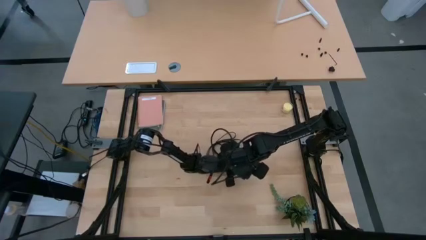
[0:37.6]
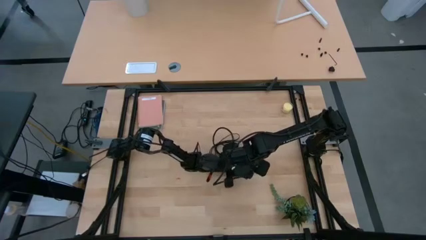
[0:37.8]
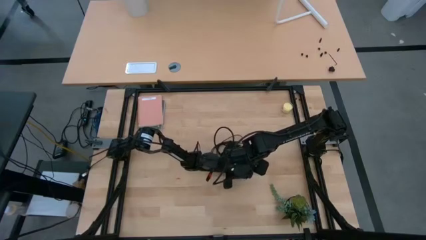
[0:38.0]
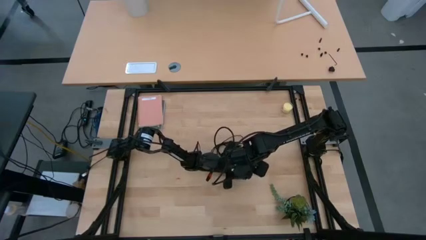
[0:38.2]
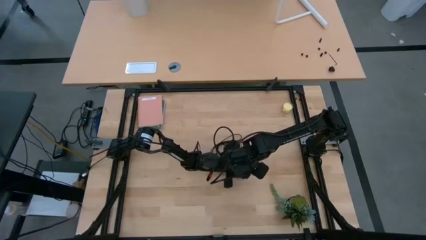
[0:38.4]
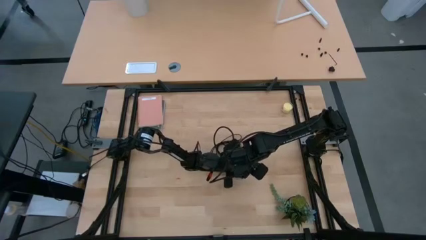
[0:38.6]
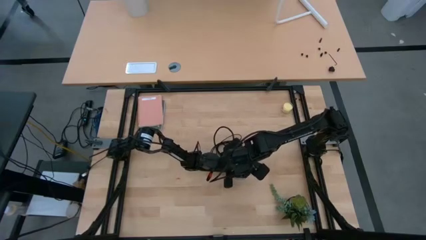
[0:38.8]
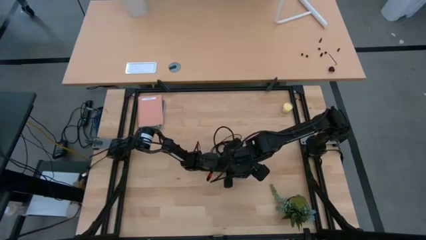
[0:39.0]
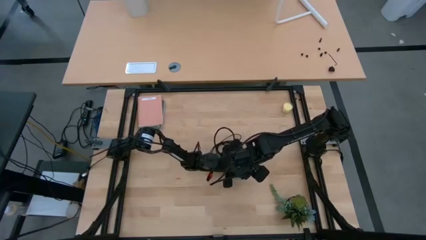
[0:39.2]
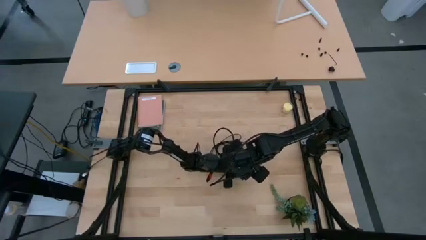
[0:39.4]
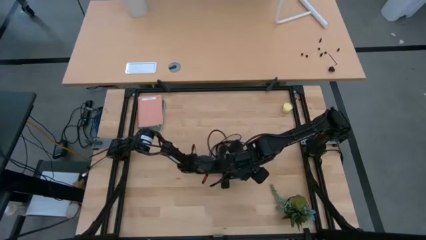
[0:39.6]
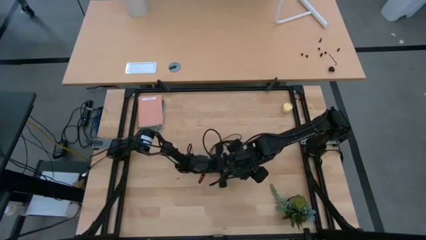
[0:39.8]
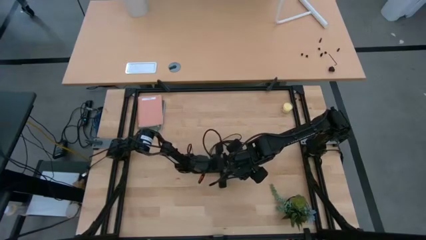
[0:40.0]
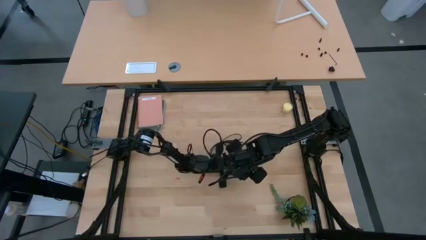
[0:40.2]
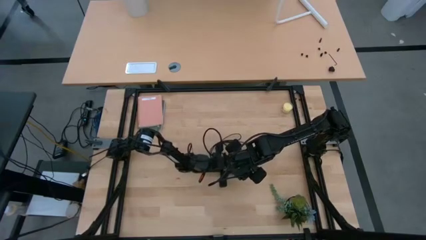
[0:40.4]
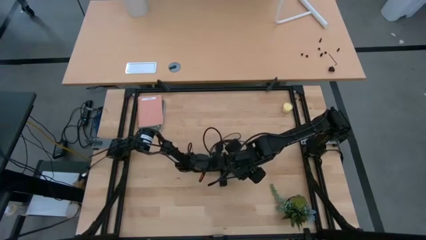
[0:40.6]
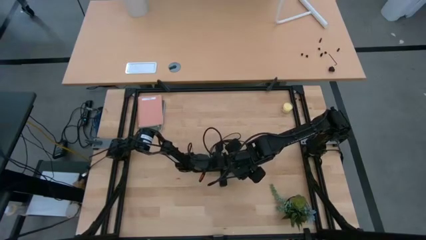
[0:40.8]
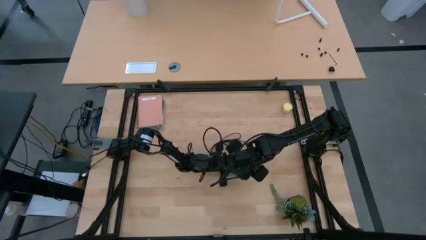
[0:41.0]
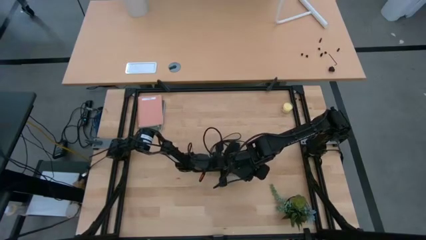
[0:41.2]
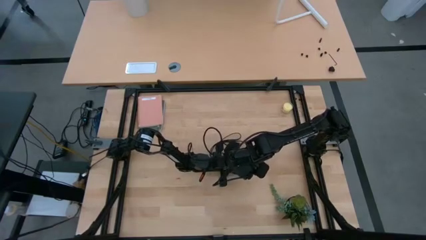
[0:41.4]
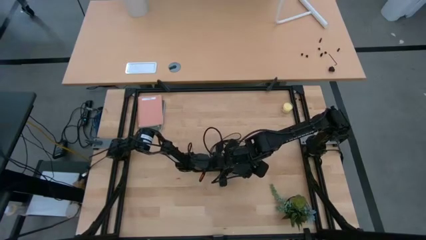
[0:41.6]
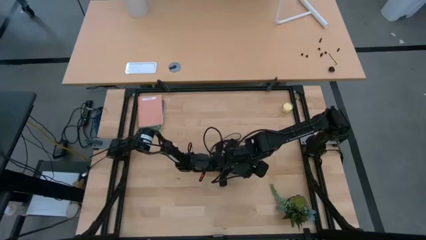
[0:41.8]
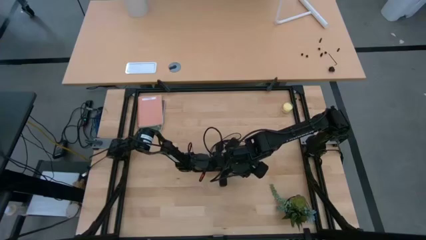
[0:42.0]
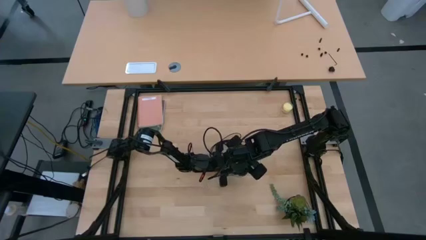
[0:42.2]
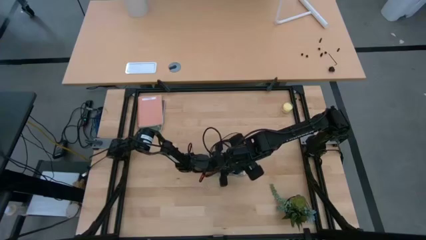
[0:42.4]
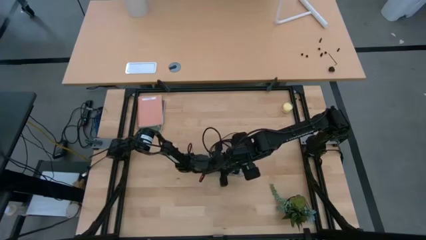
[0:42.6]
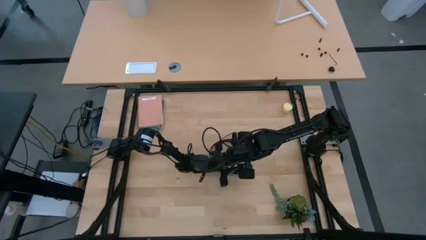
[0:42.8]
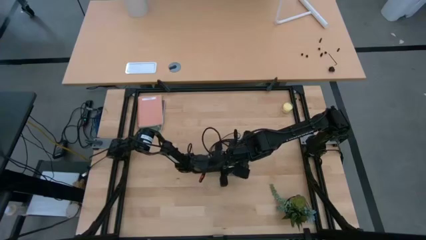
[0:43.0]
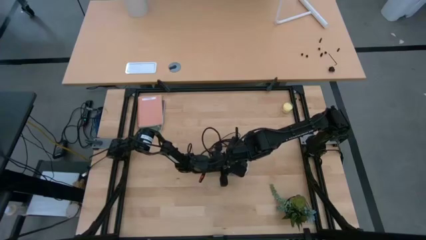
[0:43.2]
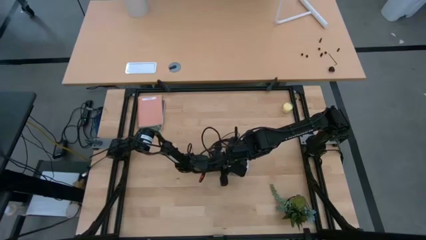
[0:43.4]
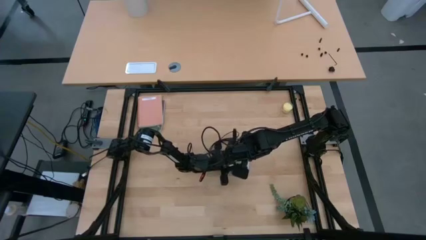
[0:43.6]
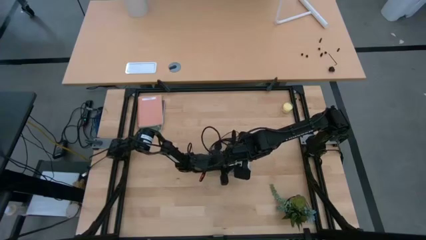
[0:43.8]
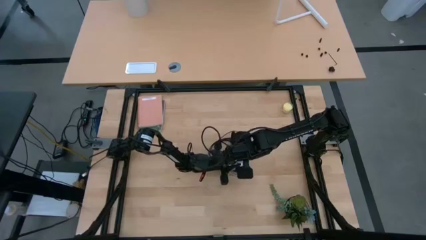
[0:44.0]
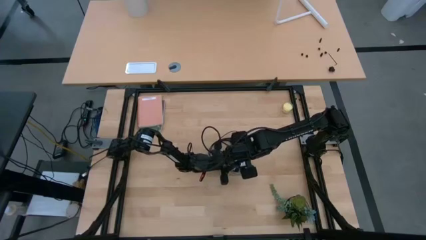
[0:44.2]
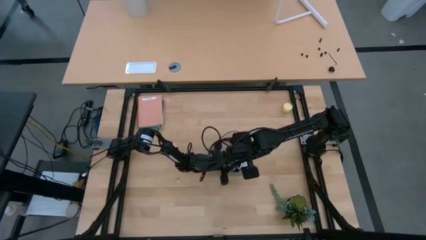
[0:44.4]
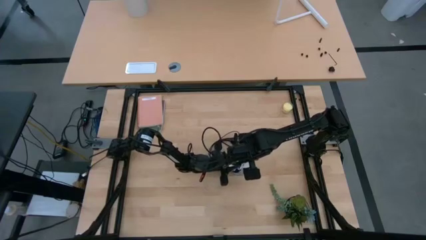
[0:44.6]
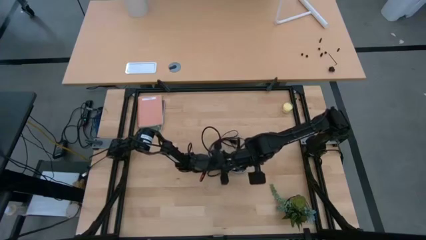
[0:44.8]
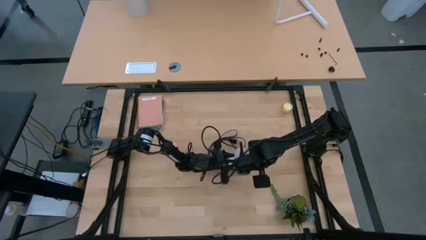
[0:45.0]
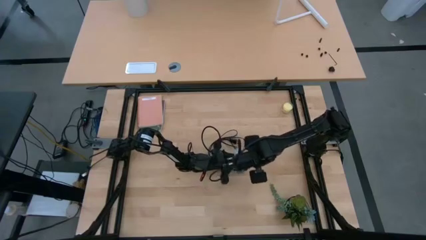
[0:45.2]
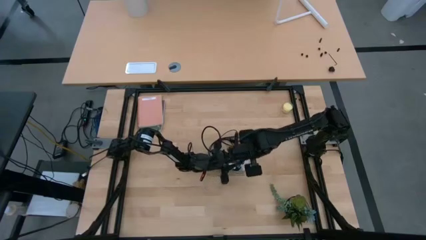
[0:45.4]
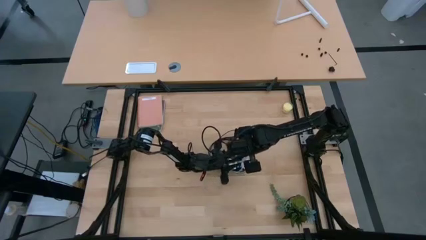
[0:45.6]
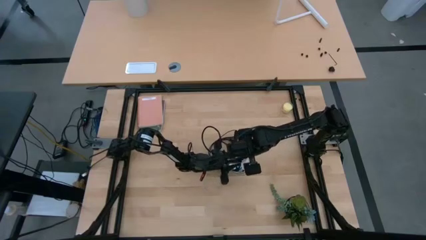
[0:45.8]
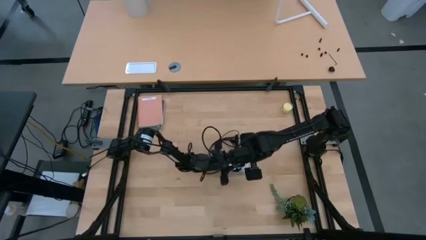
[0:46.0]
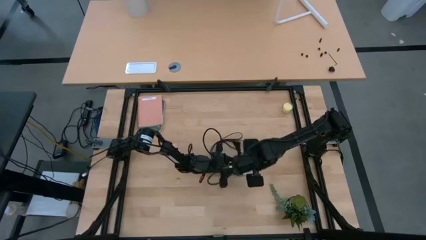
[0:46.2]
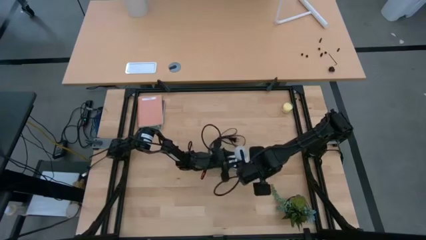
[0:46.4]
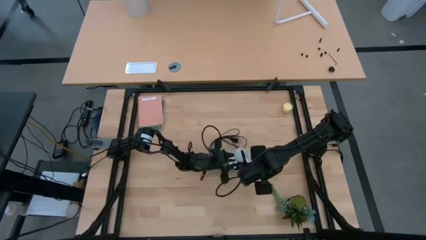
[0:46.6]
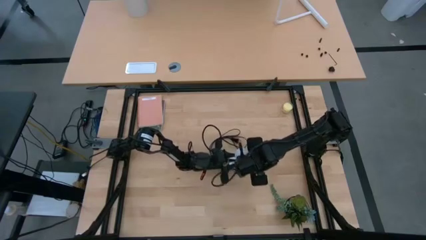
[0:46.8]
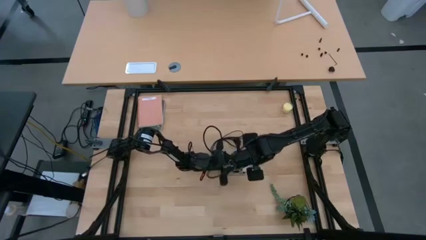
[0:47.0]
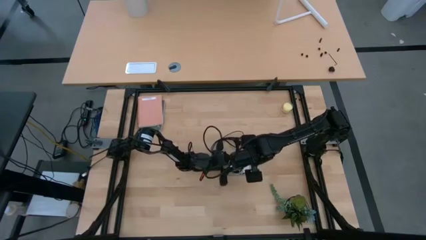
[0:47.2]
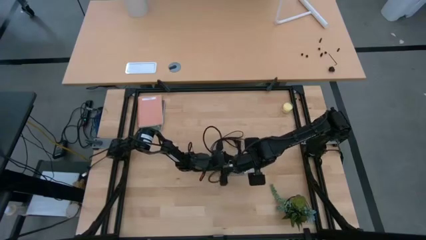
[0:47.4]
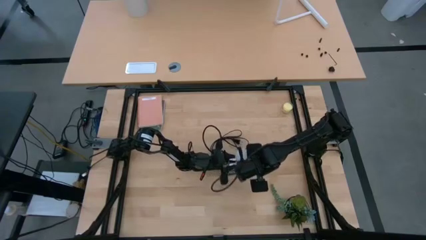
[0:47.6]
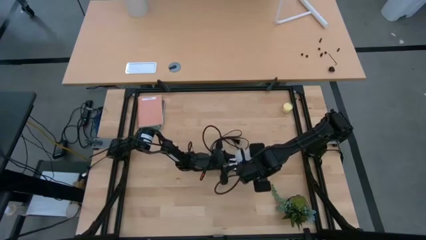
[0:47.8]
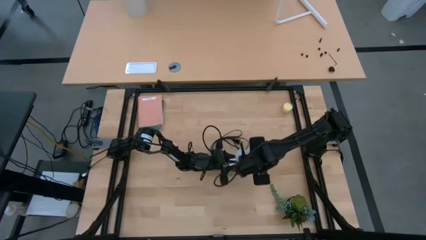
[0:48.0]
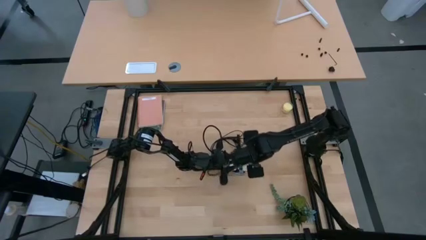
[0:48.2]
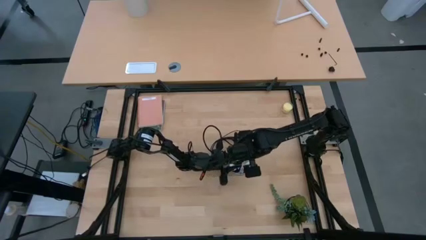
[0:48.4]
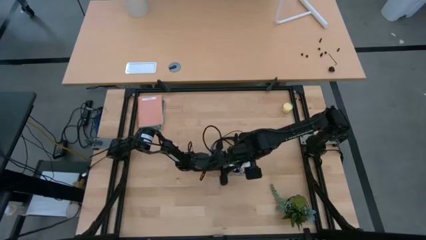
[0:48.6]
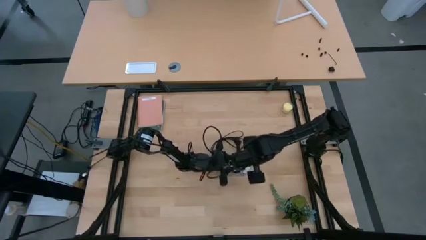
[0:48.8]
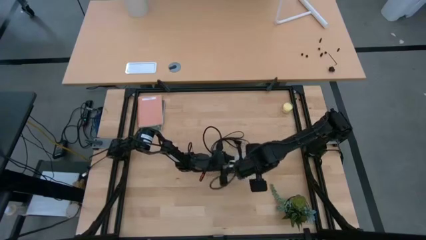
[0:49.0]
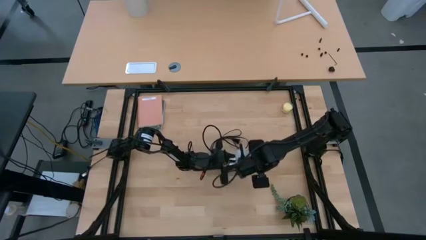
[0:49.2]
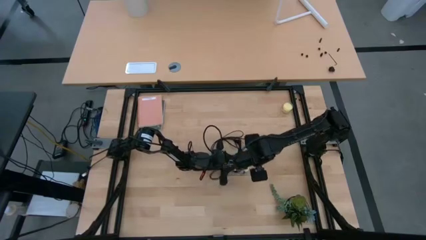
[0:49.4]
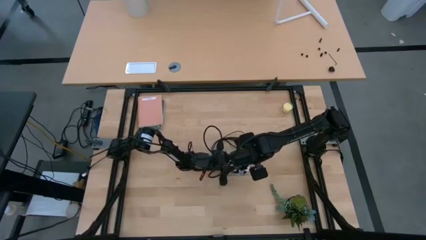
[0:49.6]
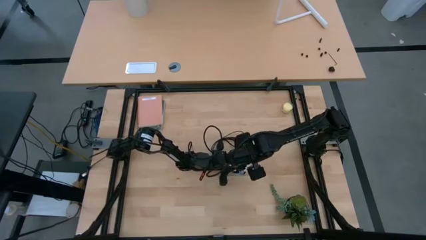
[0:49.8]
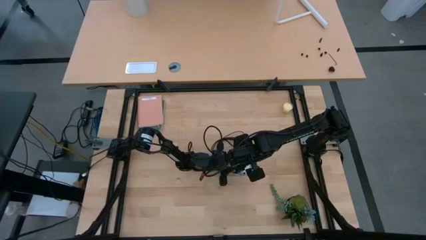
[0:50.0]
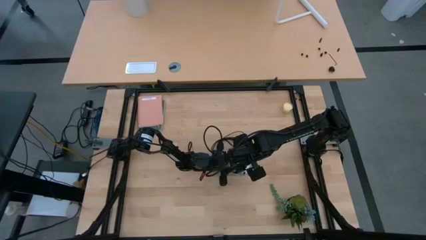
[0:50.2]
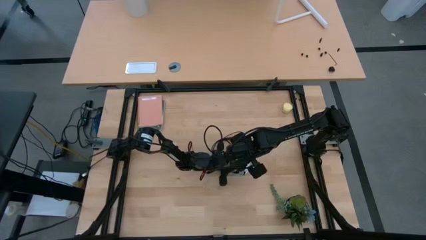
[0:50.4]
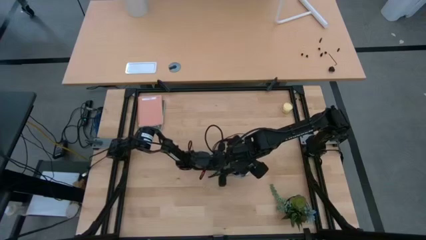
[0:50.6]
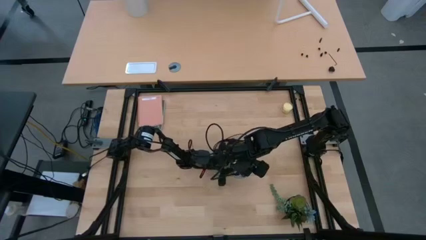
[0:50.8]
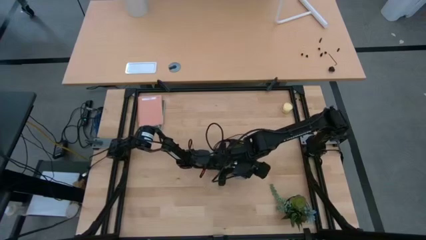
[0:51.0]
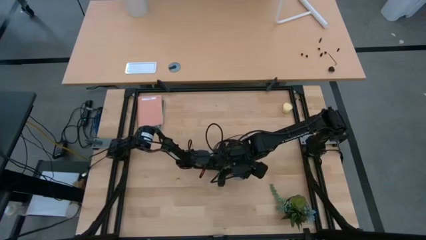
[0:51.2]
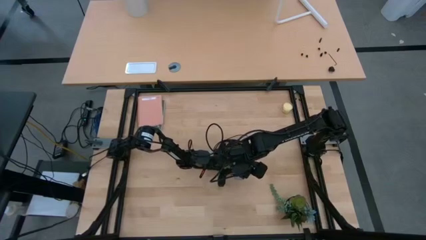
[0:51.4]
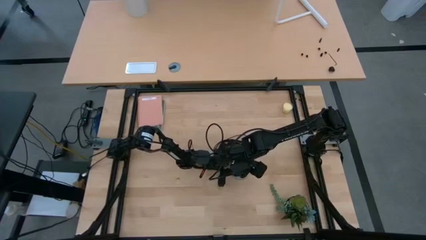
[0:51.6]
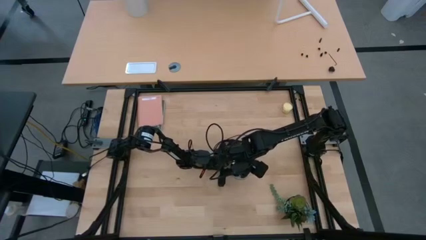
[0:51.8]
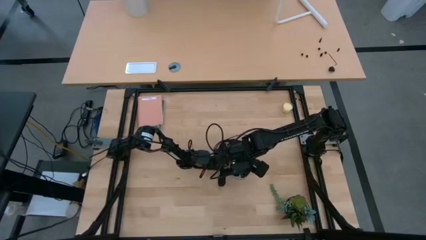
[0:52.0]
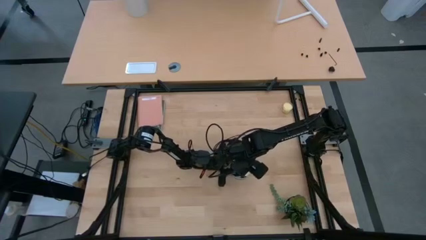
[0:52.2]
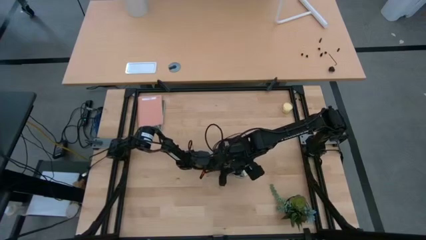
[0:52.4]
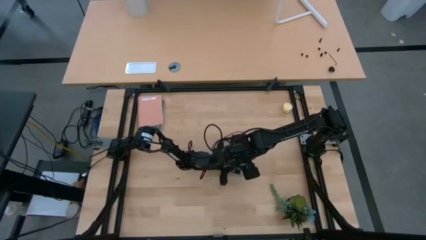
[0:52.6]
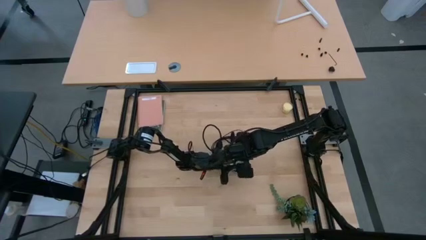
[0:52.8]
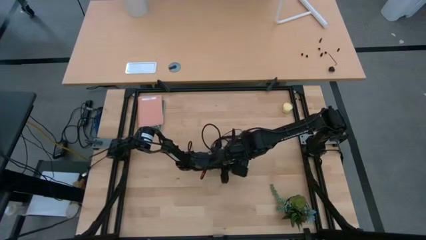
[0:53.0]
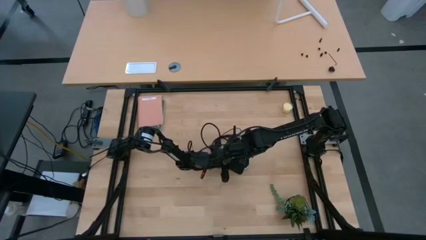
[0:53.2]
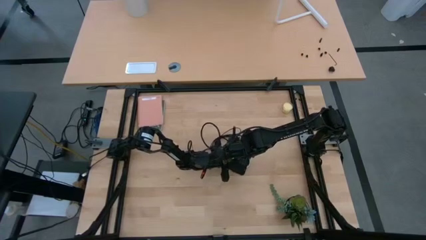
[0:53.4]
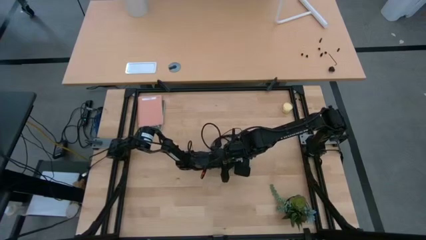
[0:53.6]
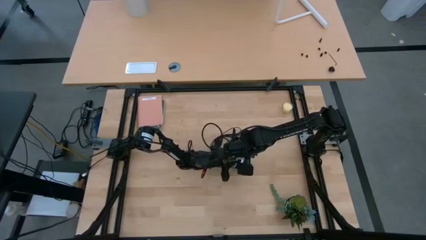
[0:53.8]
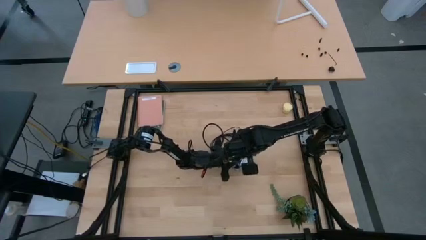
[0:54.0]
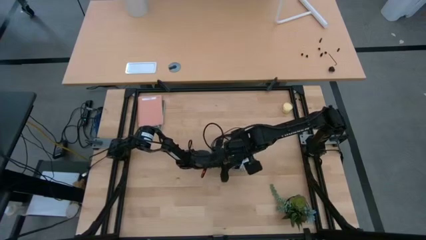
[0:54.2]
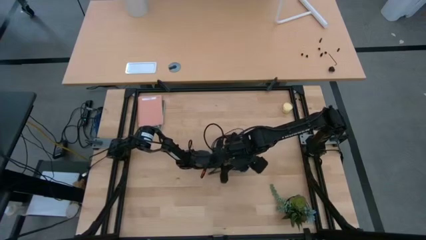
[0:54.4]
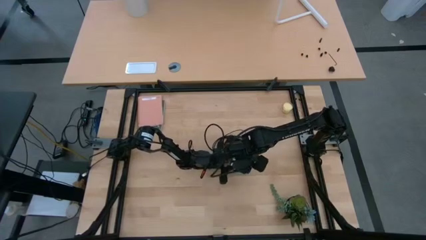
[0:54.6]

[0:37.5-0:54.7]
Task: Screw lightbulb
Insert the lightbulb into the silver lamp
